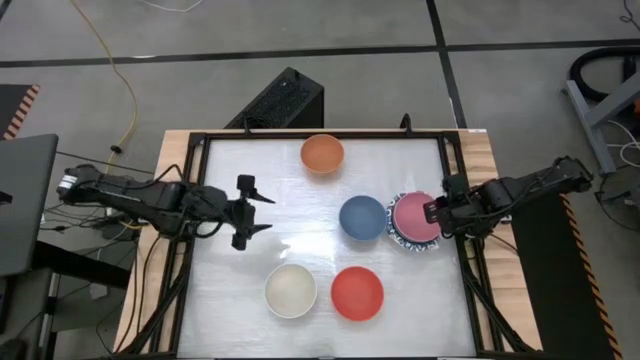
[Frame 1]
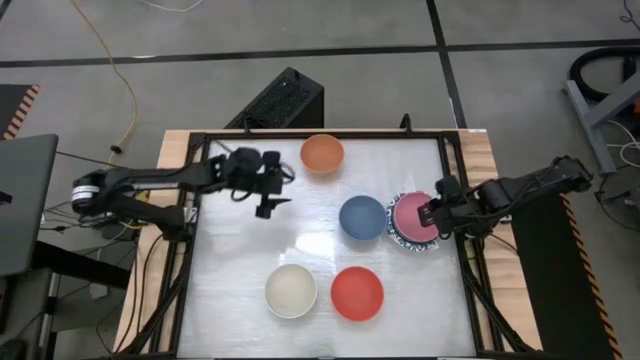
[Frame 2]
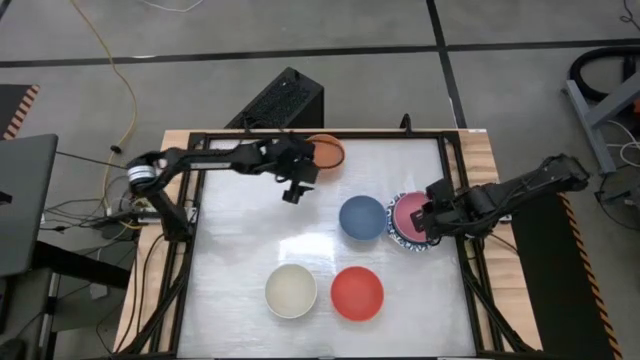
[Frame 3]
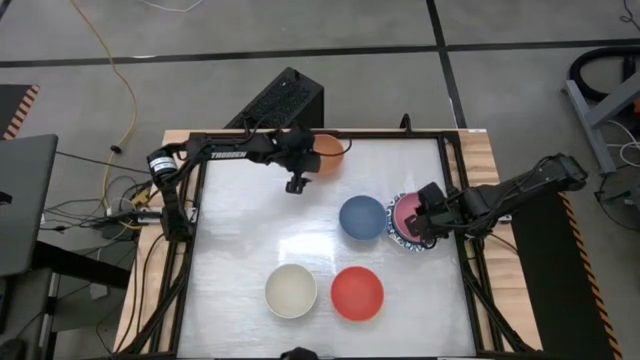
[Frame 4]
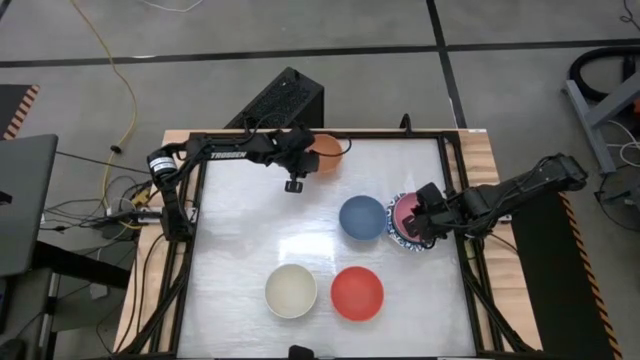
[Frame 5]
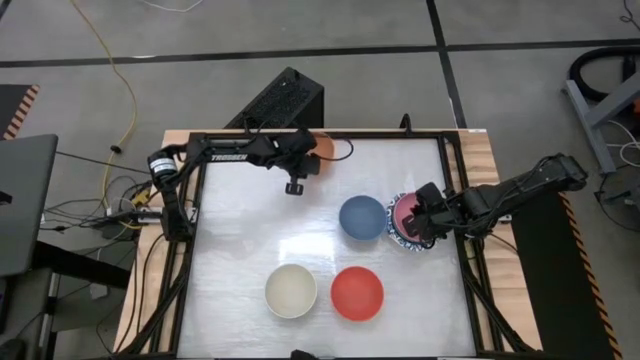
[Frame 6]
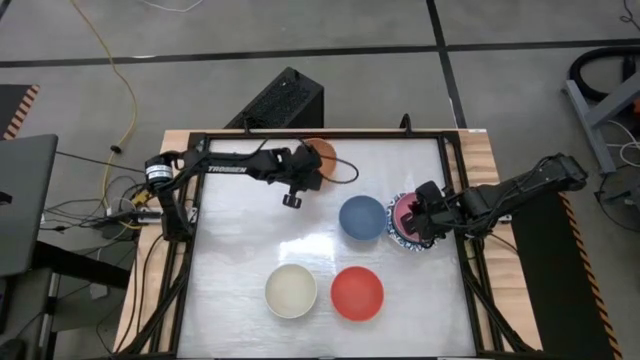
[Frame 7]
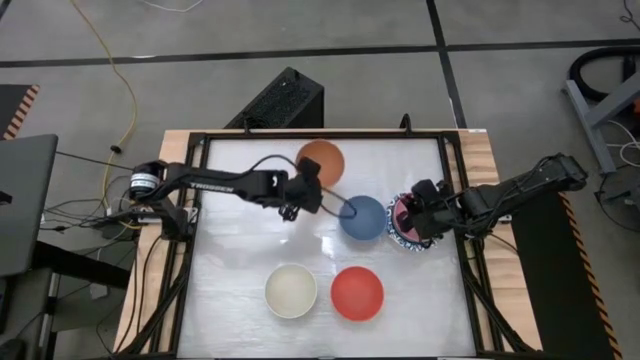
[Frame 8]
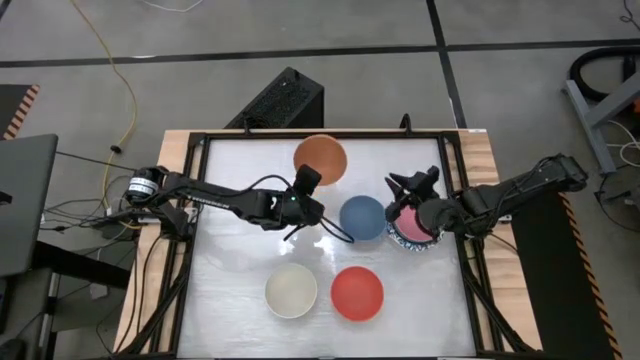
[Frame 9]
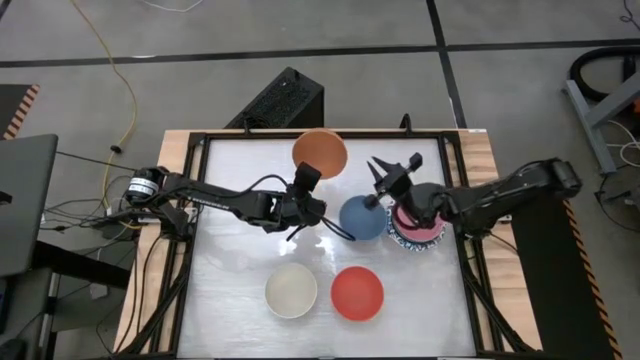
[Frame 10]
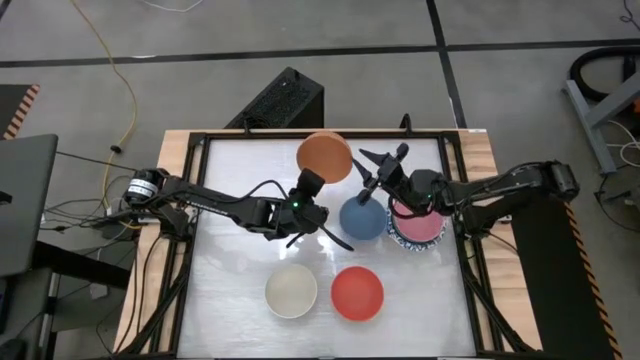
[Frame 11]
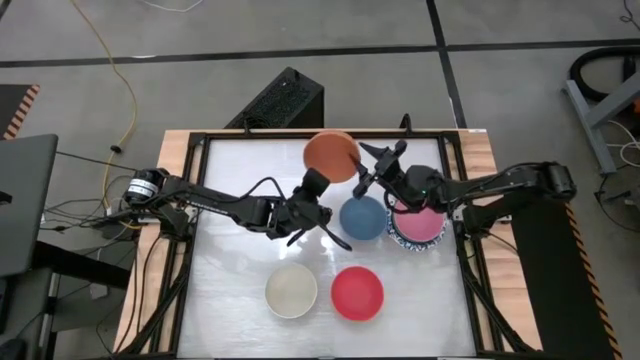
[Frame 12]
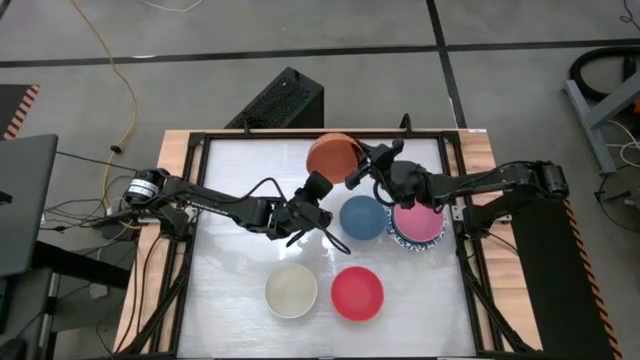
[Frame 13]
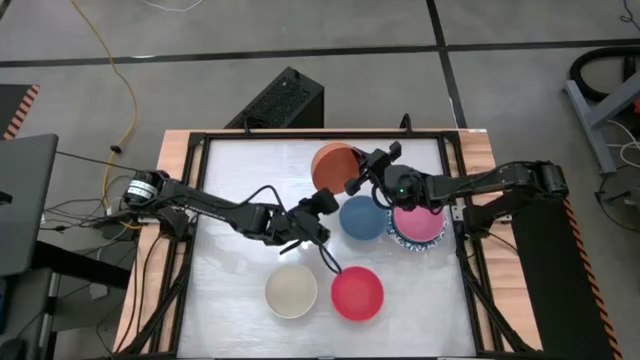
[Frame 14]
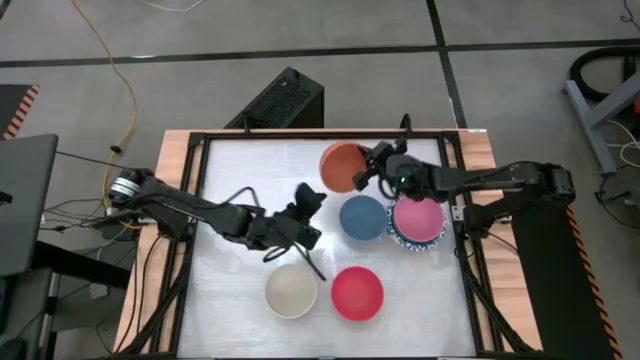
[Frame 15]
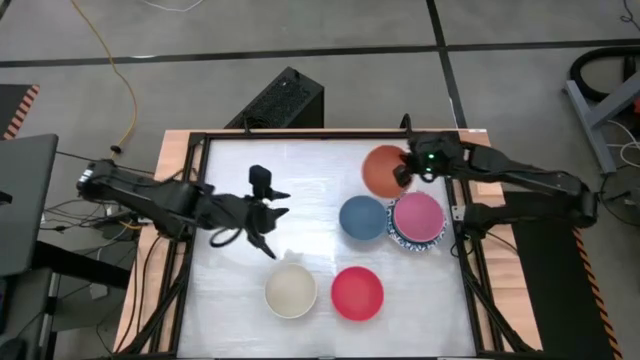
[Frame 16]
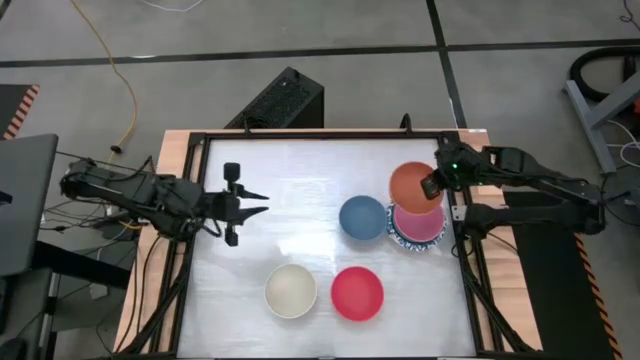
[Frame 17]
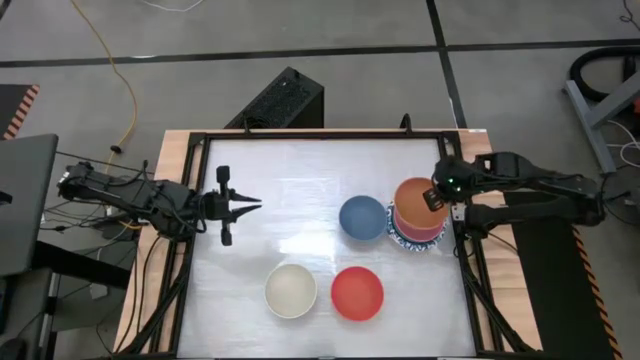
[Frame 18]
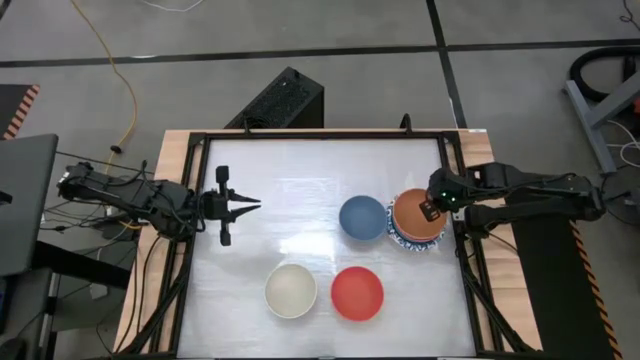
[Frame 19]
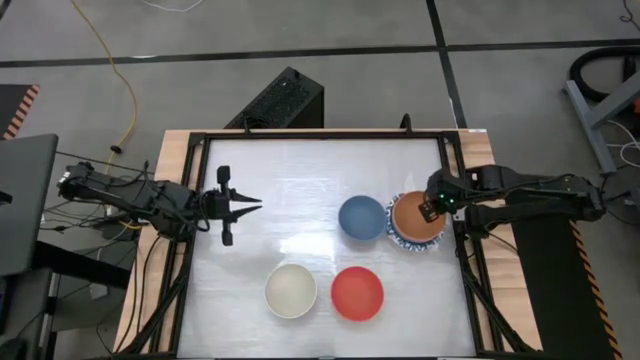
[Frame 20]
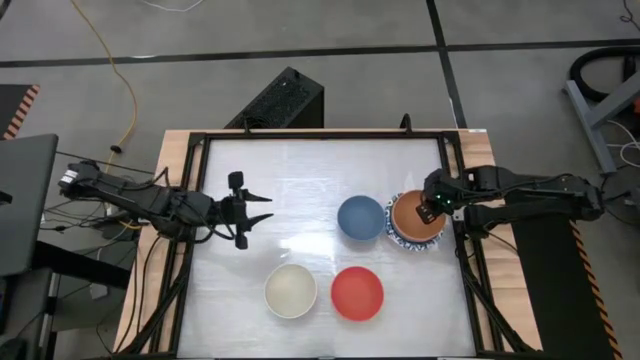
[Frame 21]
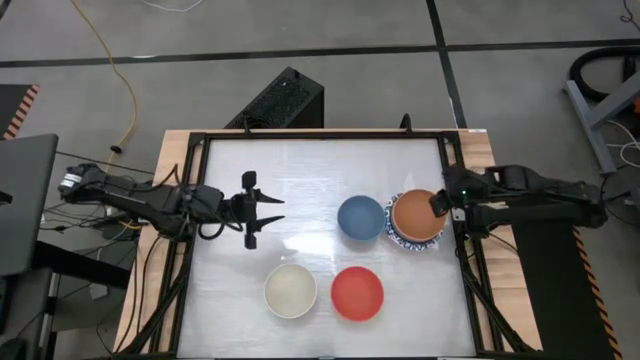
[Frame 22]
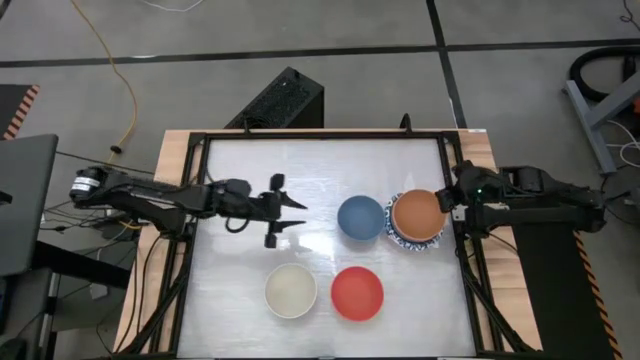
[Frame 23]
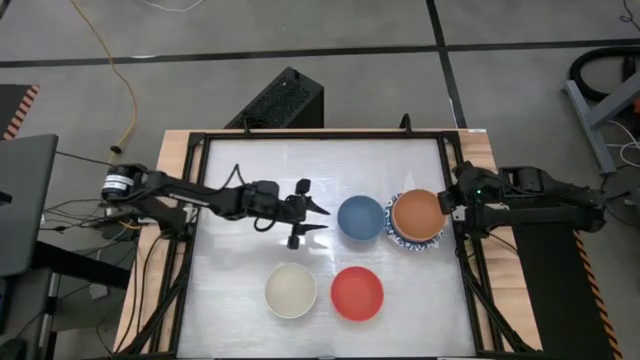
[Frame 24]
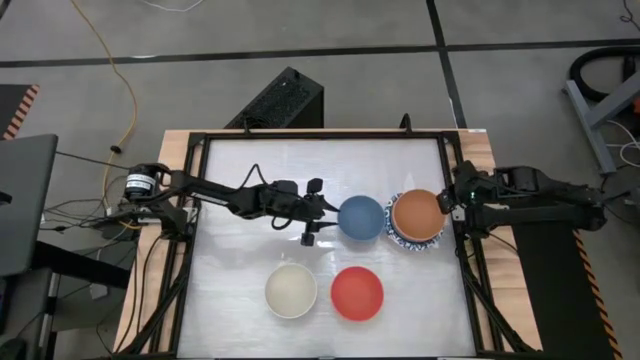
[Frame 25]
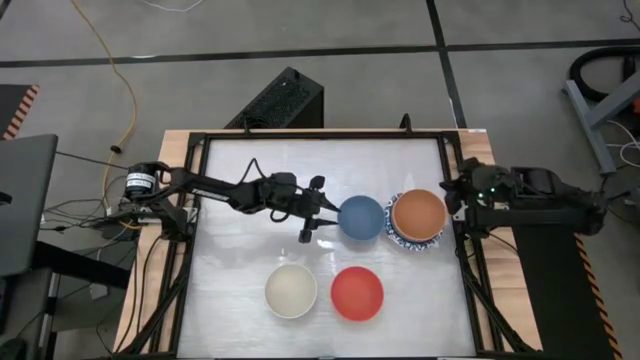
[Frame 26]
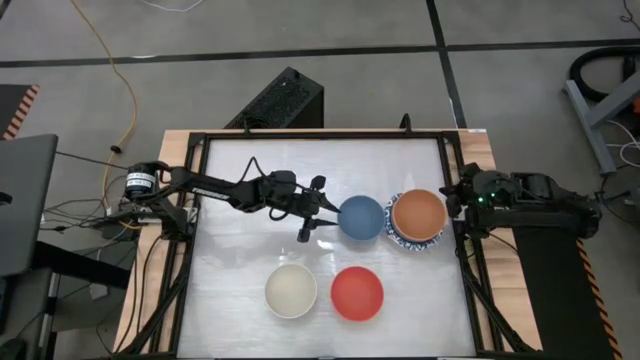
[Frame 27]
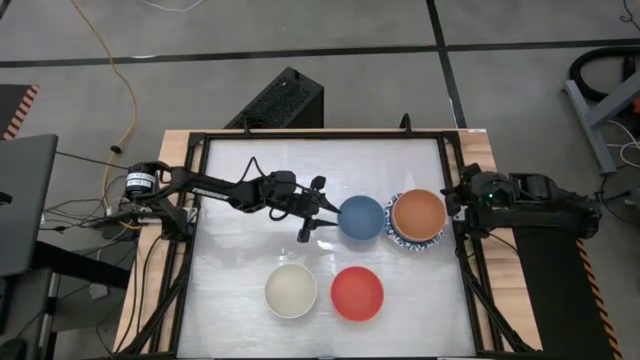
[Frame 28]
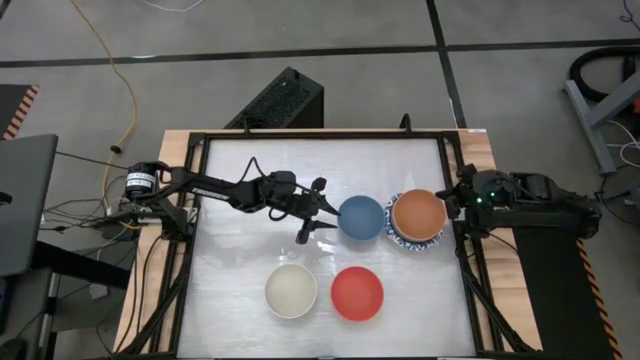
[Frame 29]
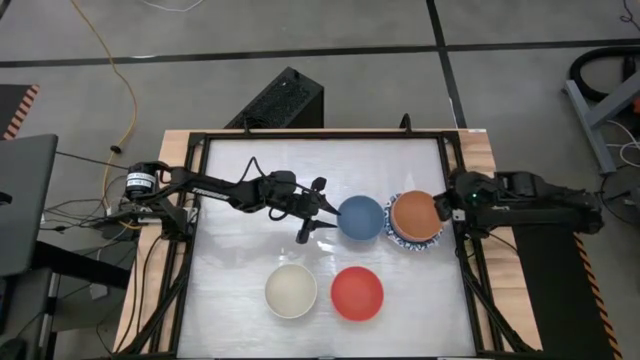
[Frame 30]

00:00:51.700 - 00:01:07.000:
Stack the brown bowl on top of the pink bowl

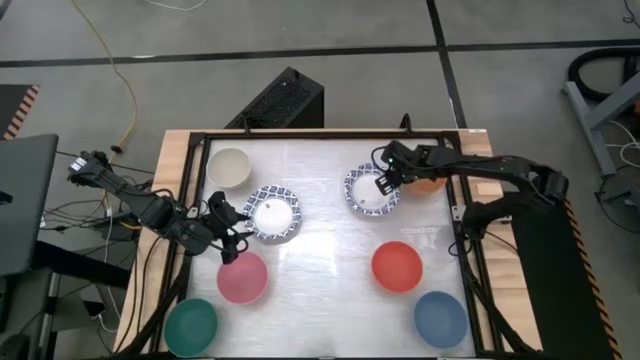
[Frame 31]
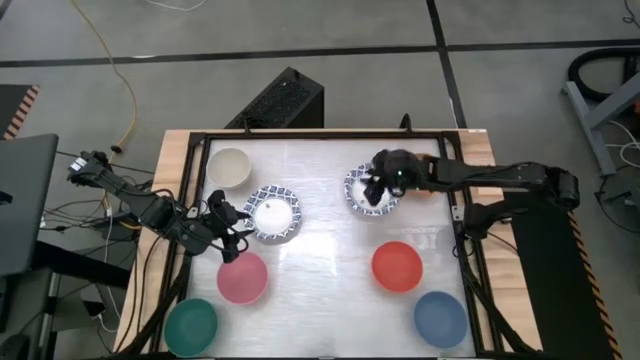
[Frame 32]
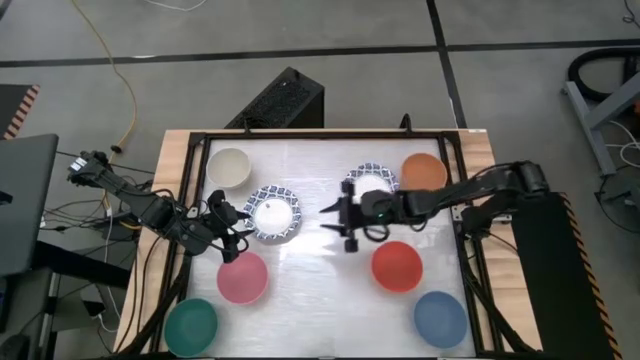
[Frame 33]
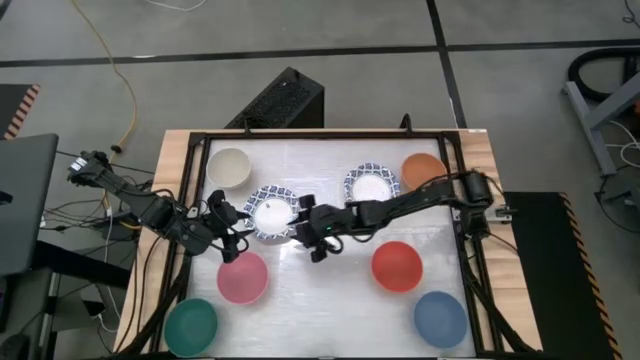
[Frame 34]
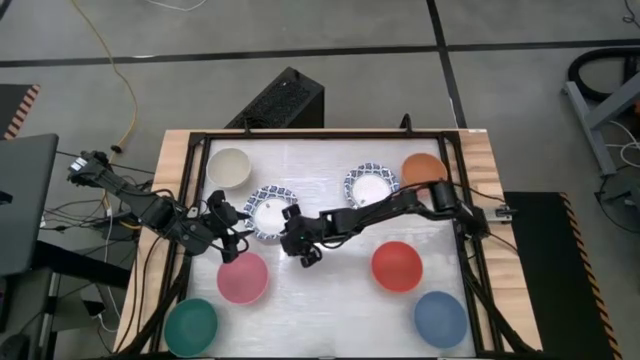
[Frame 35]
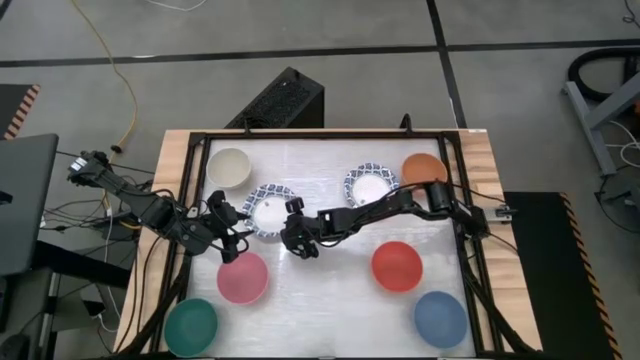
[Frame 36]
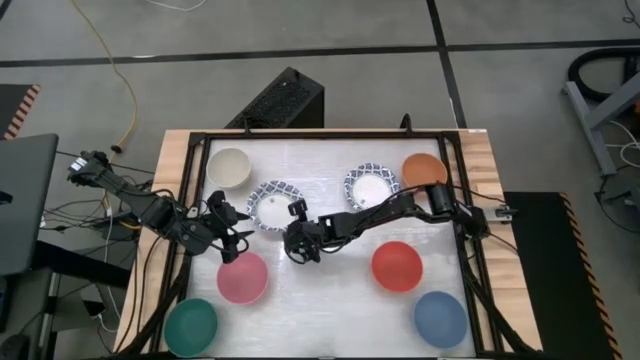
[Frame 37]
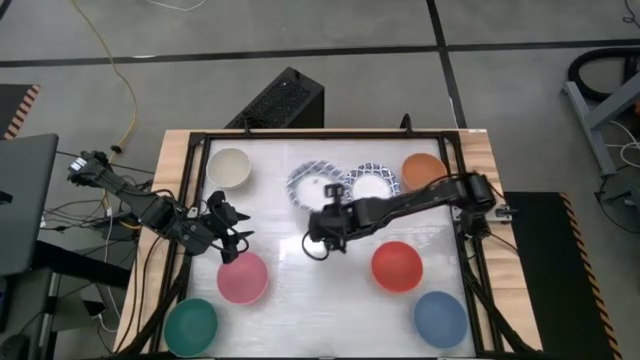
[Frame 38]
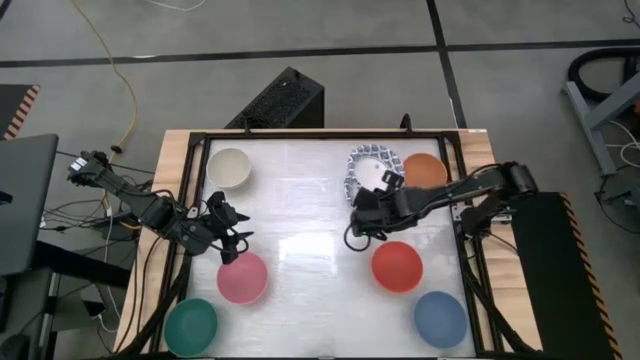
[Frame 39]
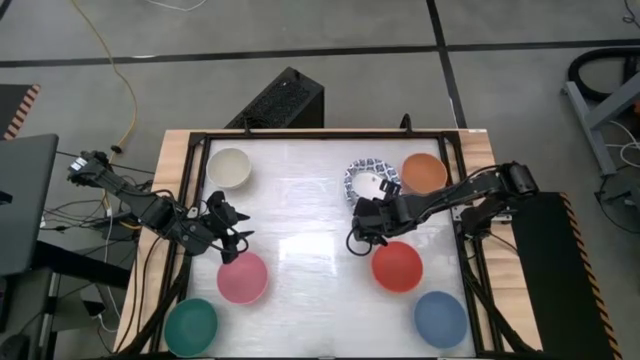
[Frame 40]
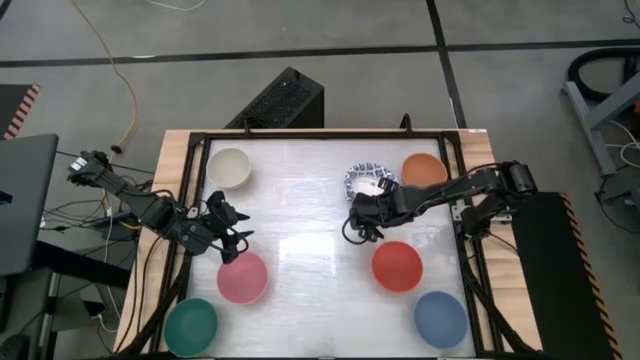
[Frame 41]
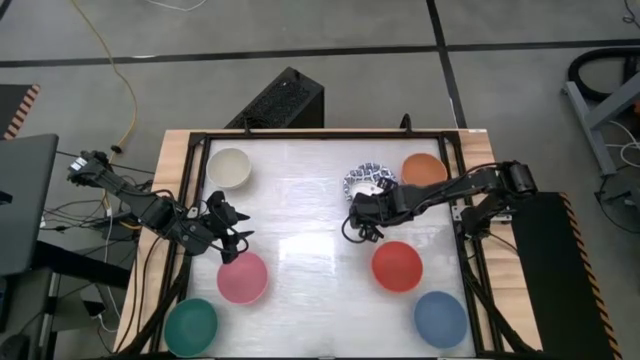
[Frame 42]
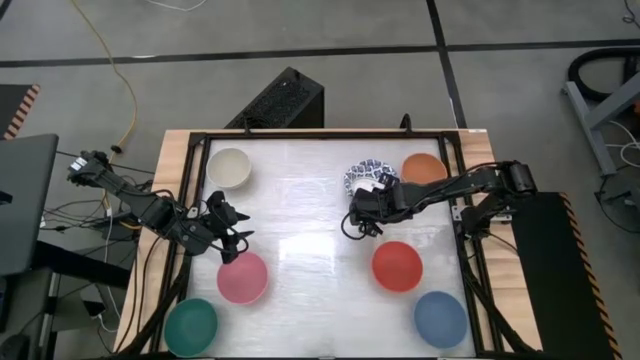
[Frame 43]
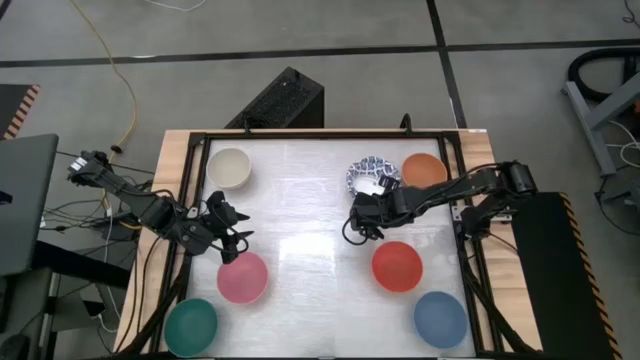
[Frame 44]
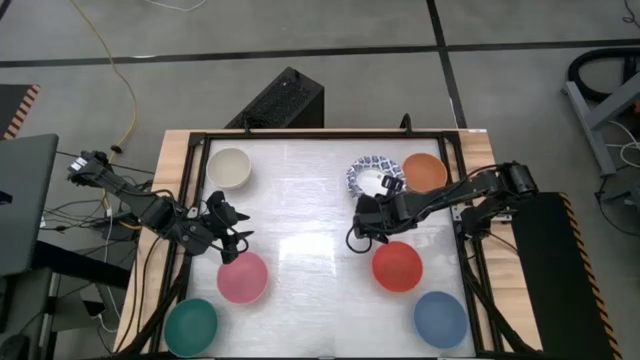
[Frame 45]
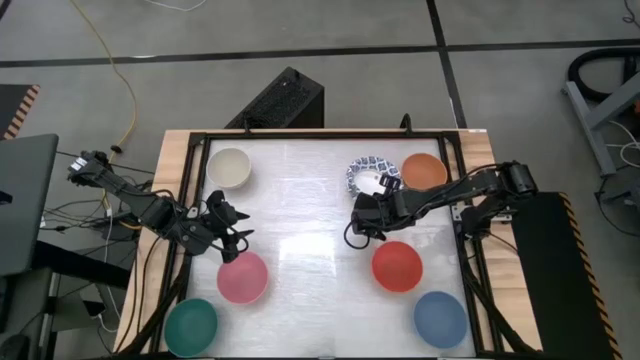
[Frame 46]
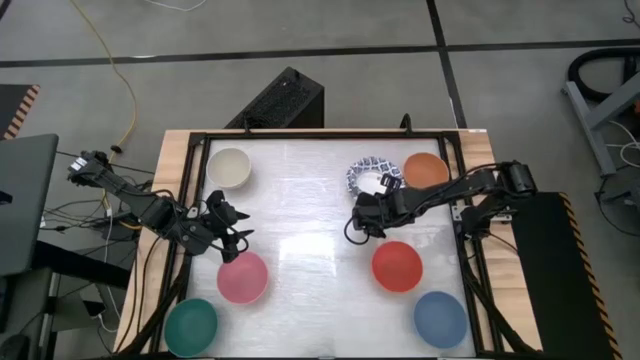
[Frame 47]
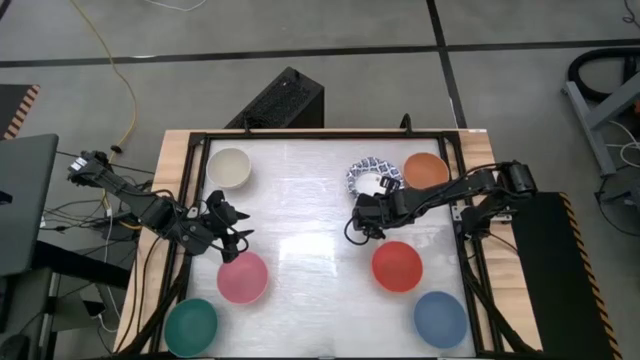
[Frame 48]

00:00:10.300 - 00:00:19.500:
Stack the left white patterned bowl on top of the top white patterned bowl
